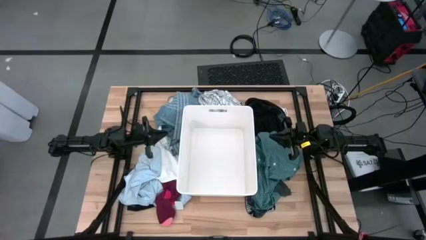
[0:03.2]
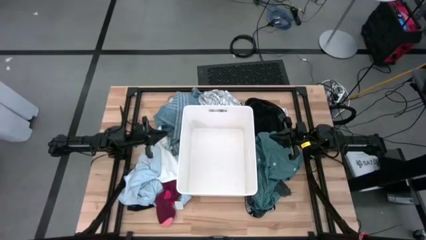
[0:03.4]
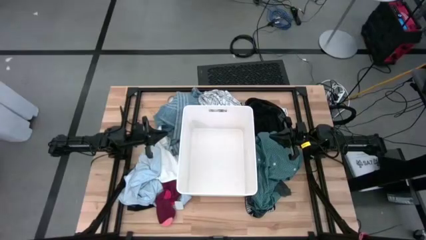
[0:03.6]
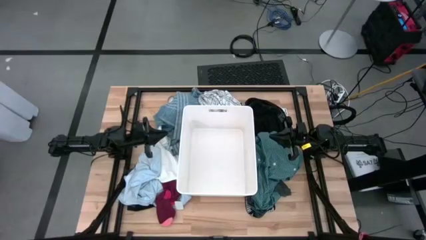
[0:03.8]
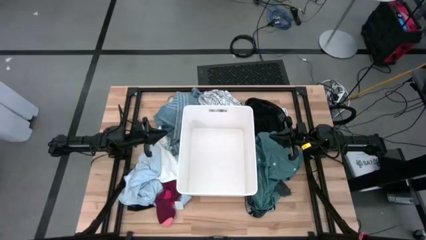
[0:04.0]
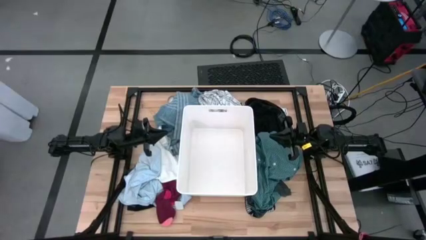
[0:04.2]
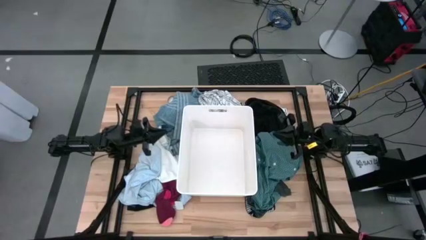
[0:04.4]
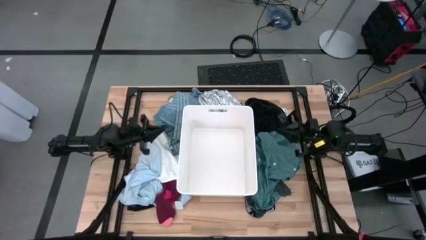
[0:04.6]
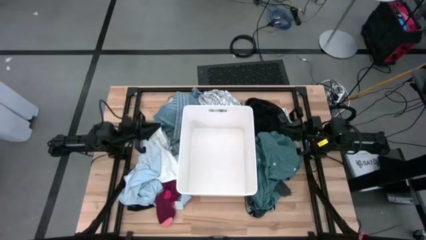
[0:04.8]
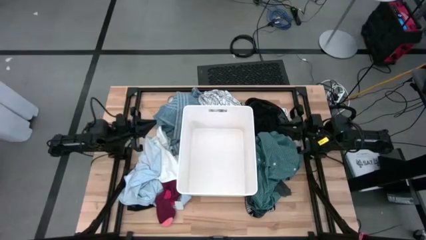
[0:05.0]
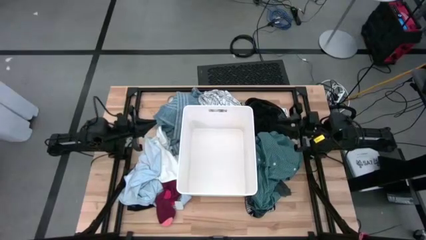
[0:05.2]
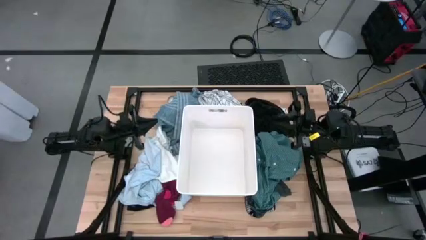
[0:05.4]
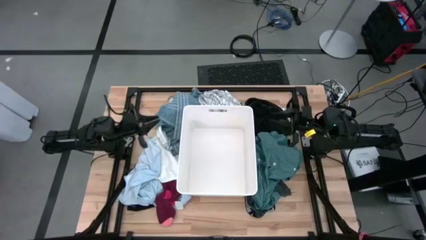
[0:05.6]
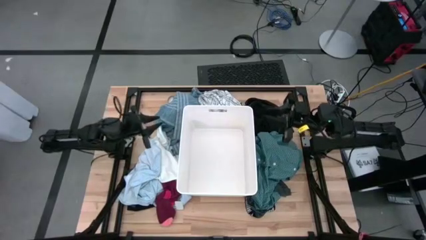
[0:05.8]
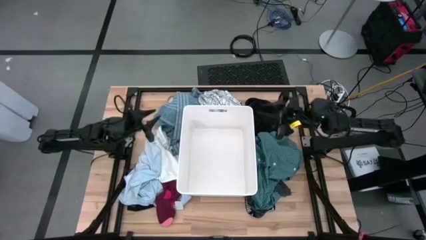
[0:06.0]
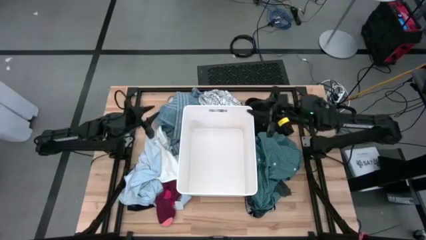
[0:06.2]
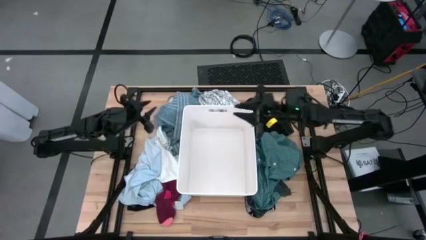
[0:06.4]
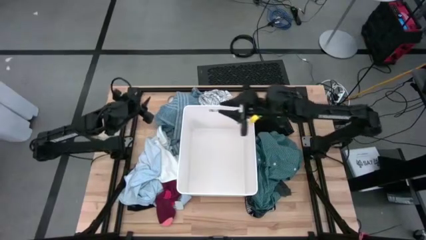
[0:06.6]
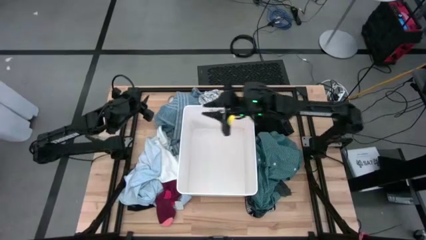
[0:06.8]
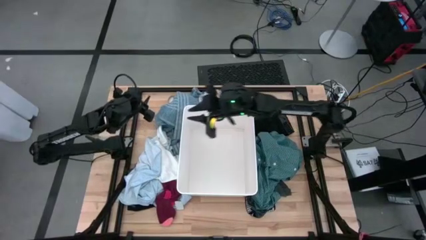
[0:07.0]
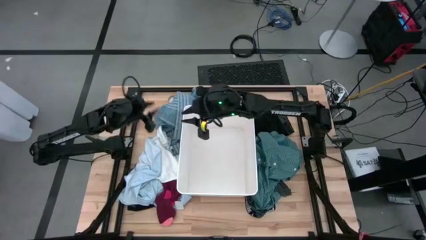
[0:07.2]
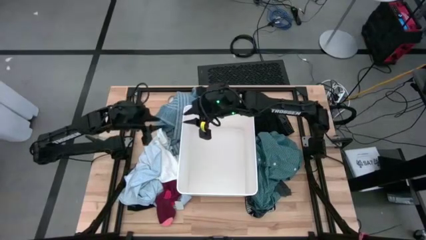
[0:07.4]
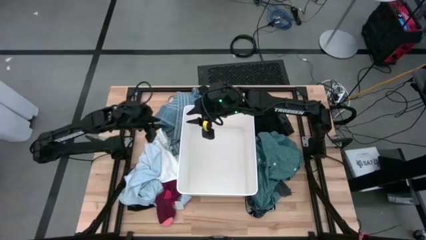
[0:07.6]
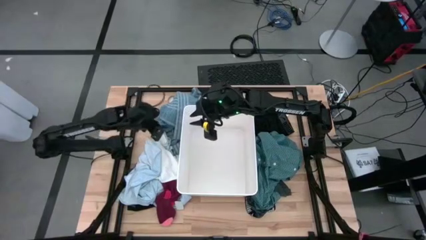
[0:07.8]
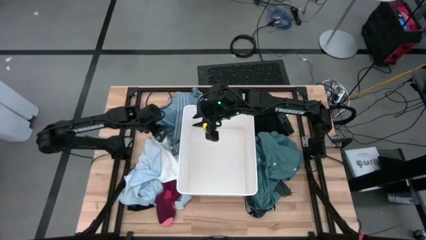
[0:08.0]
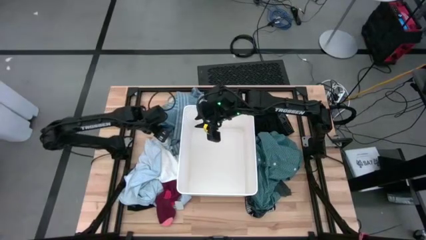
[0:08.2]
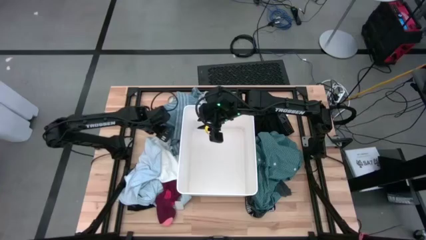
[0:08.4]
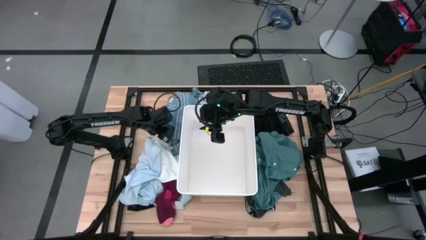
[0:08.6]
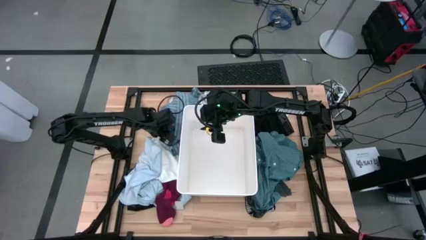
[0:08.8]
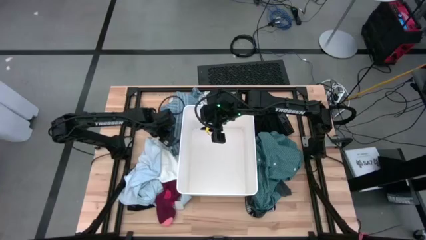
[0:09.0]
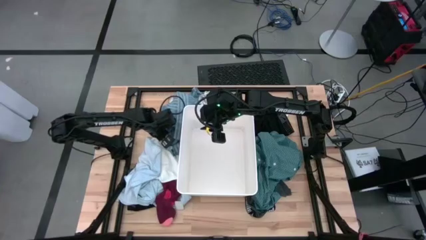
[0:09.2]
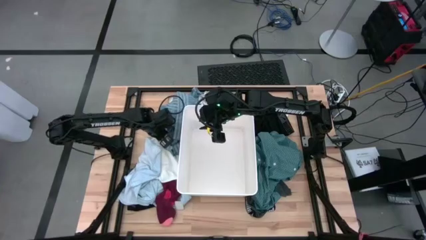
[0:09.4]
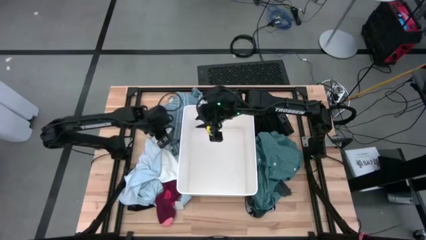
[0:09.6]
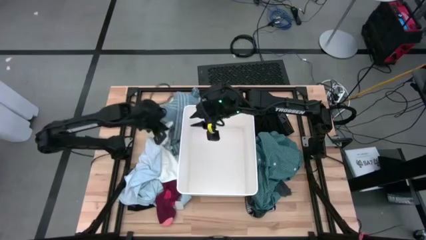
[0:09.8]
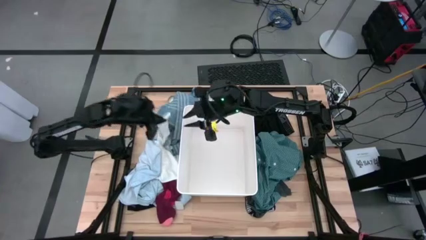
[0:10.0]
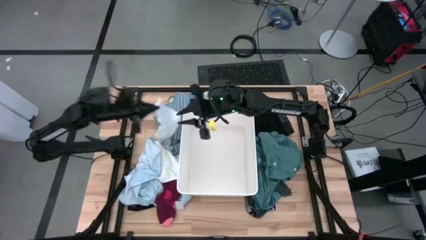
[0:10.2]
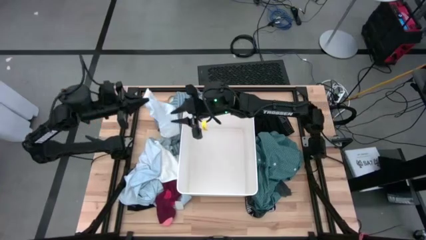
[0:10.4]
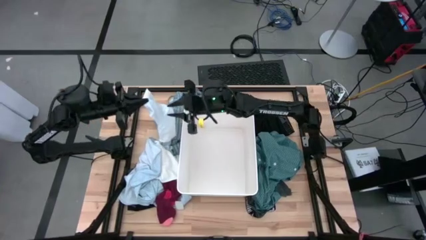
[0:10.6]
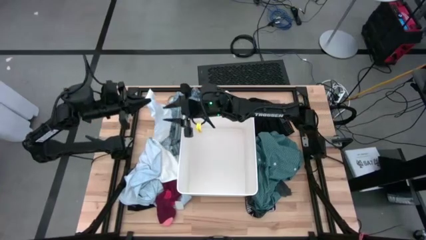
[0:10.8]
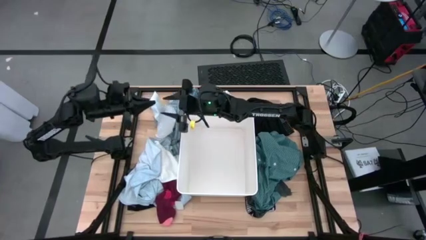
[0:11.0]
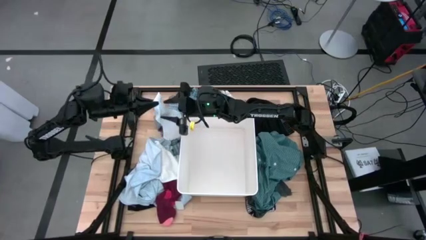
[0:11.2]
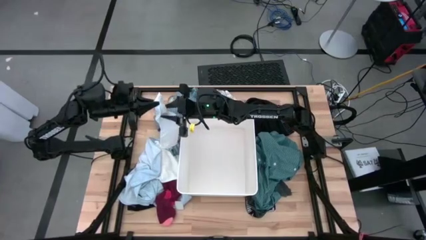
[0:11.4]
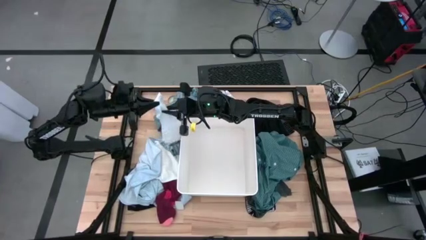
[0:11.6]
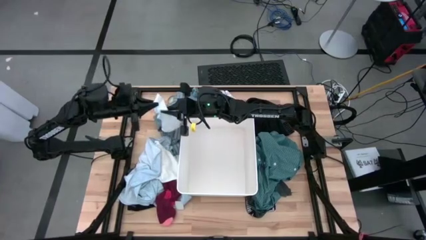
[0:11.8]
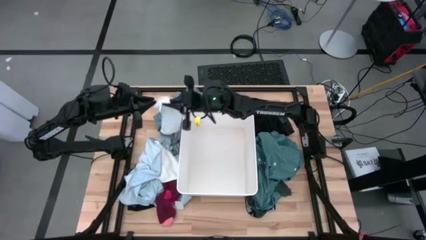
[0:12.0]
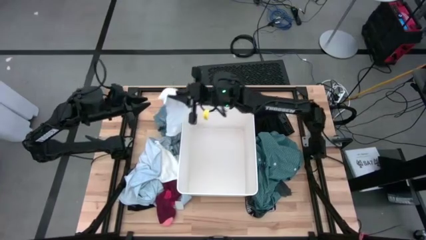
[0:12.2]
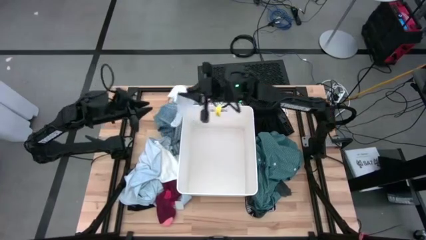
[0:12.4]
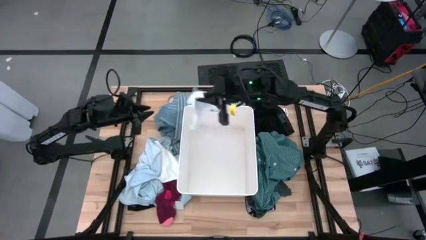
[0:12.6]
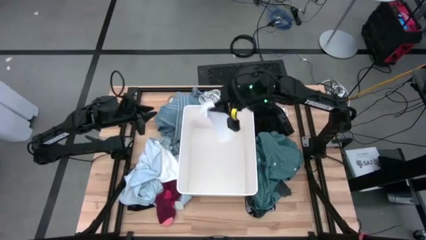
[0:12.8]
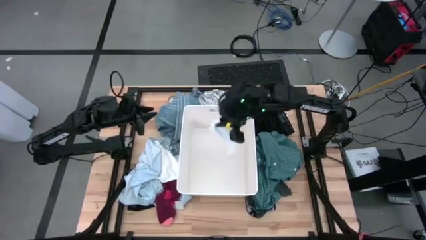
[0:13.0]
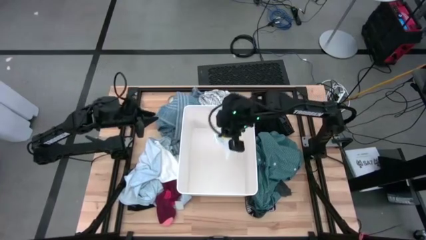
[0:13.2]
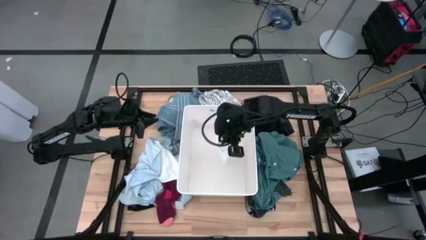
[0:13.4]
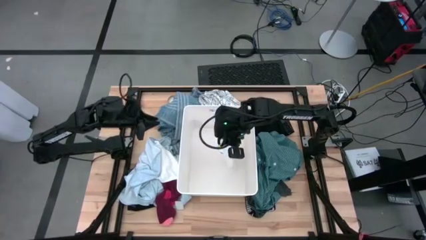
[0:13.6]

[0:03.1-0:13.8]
Task: Sort clothes
Put the white sock into the white bin

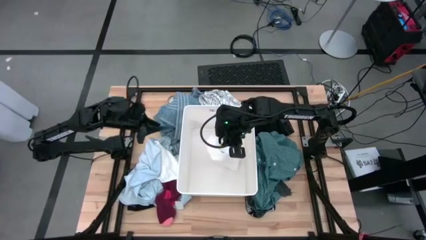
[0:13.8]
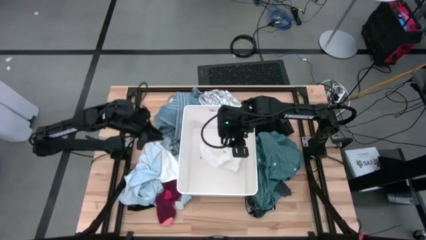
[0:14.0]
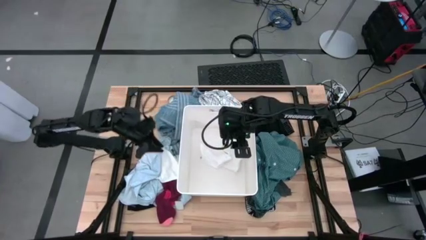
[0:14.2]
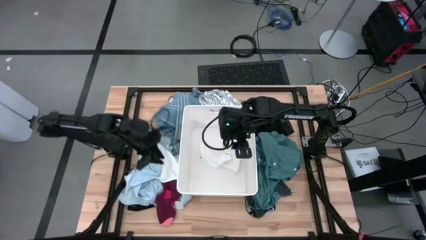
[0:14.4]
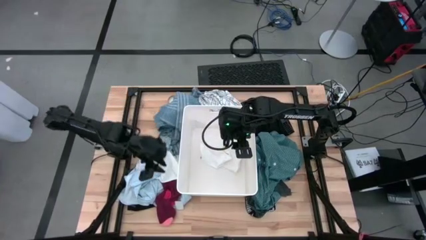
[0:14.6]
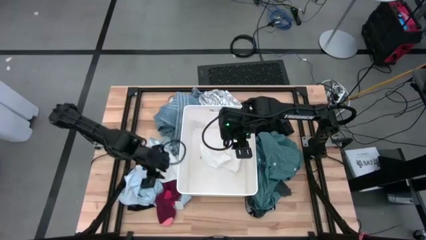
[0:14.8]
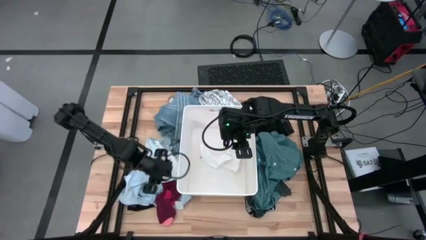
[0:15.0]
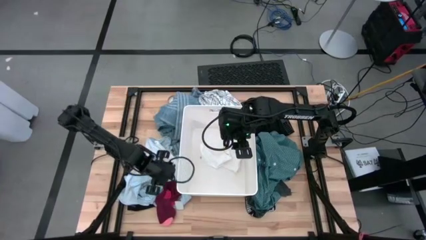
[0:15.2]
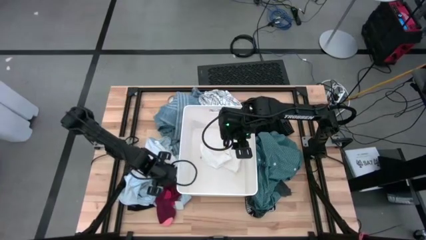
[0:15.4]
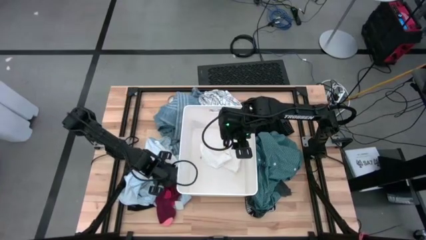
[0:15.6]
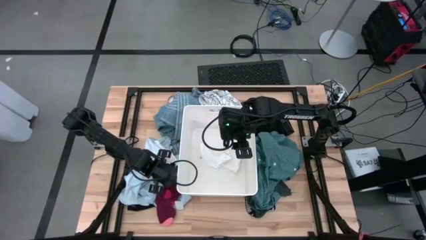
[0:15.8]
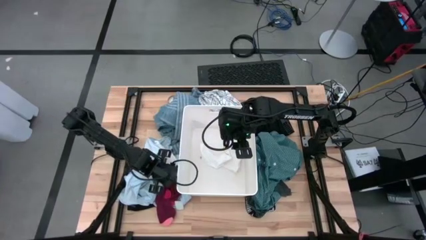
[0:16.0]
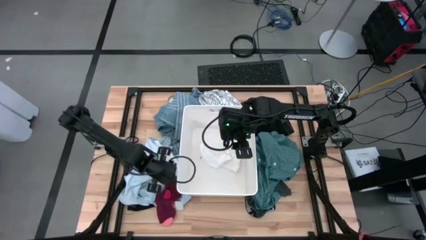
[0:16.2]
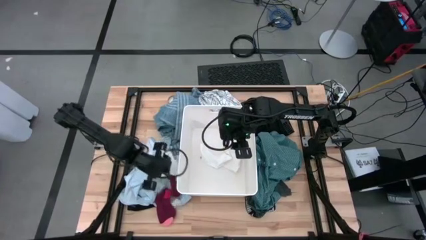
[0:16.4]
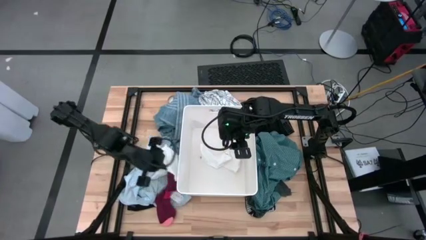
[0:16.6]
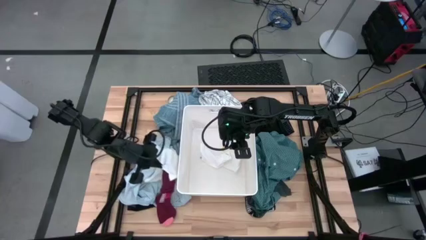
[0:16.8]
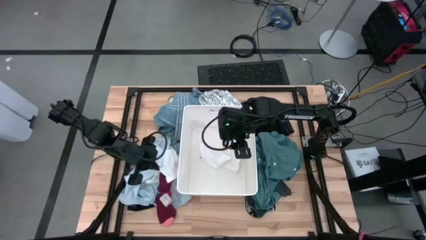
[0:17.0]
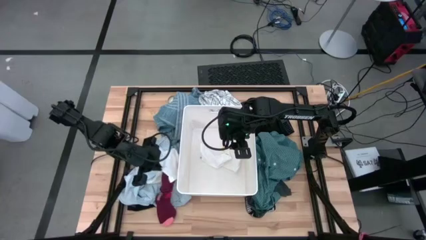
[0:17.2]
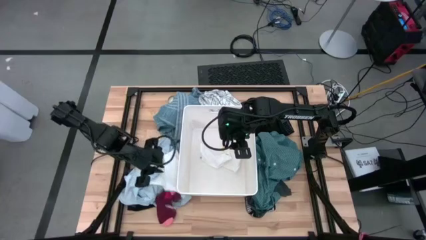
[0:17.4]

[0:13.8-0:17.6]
Put the white underwear into the white bin
